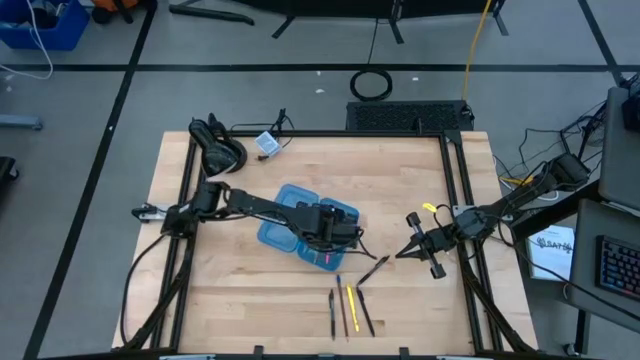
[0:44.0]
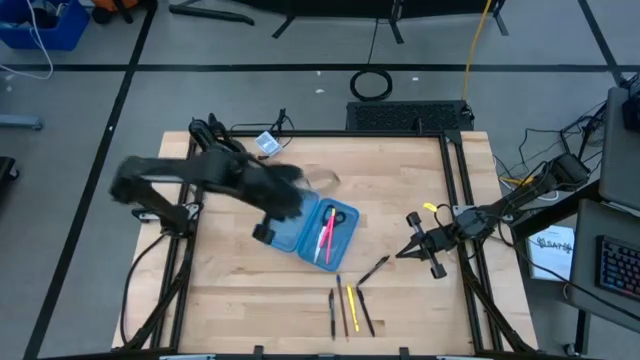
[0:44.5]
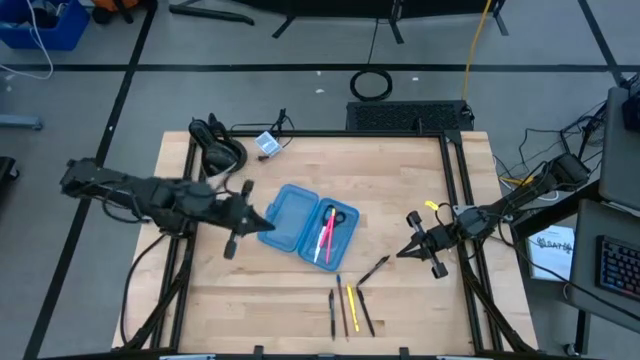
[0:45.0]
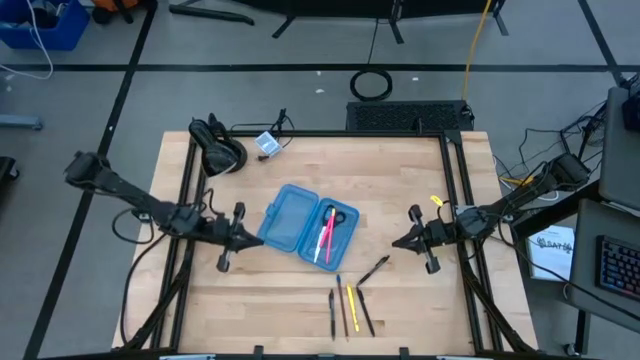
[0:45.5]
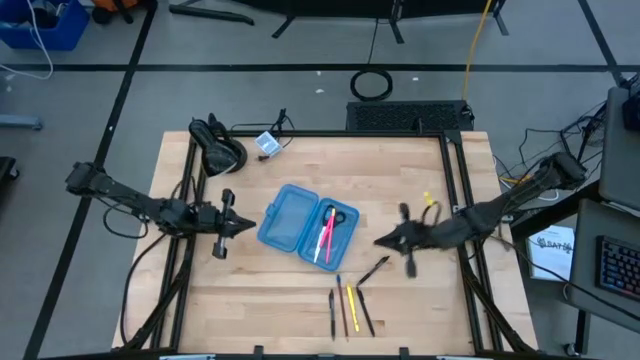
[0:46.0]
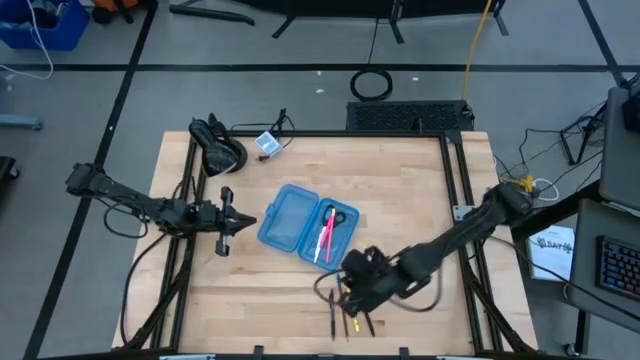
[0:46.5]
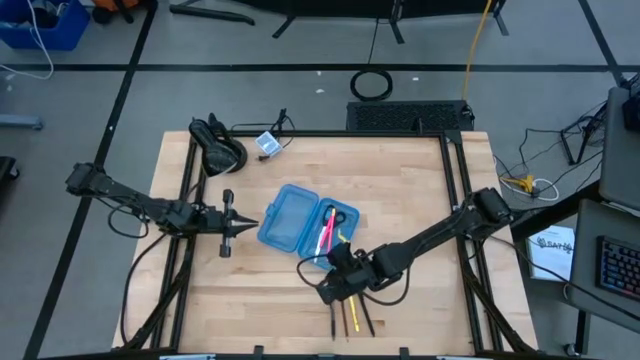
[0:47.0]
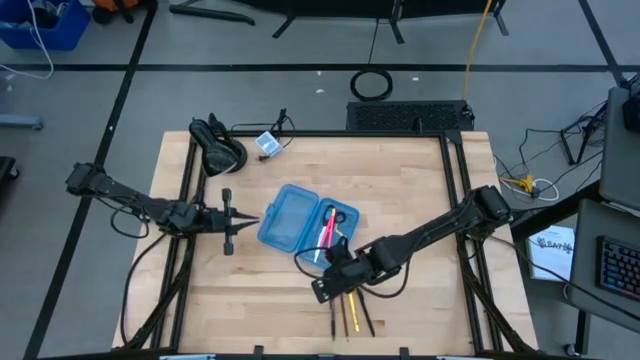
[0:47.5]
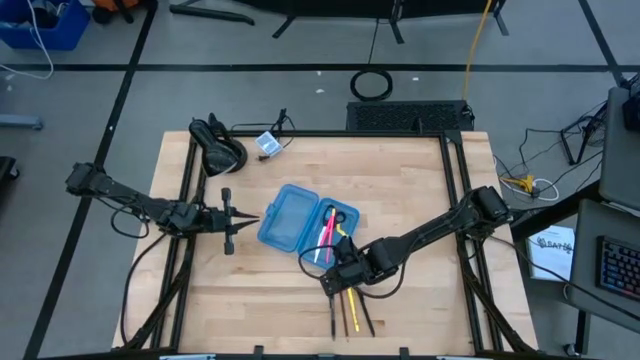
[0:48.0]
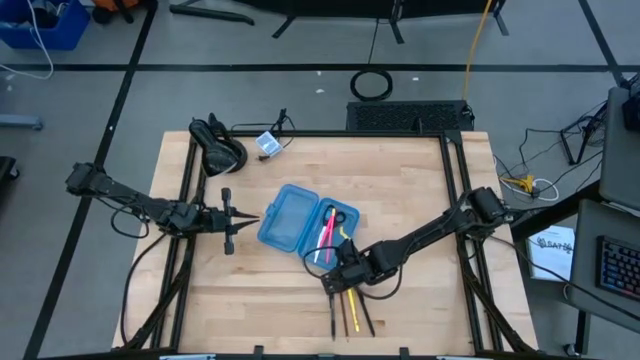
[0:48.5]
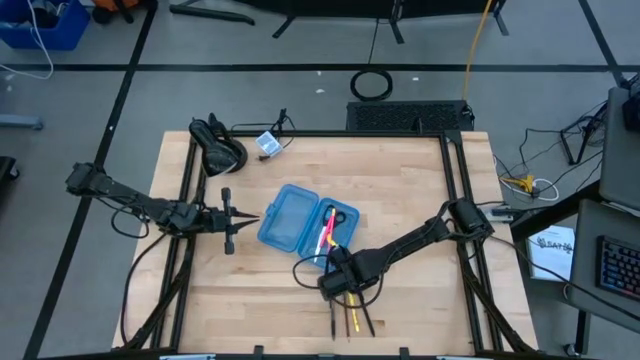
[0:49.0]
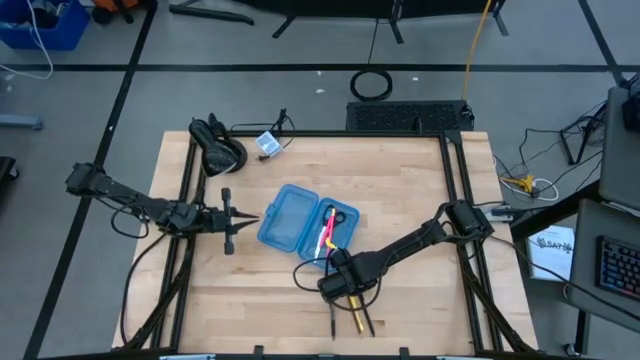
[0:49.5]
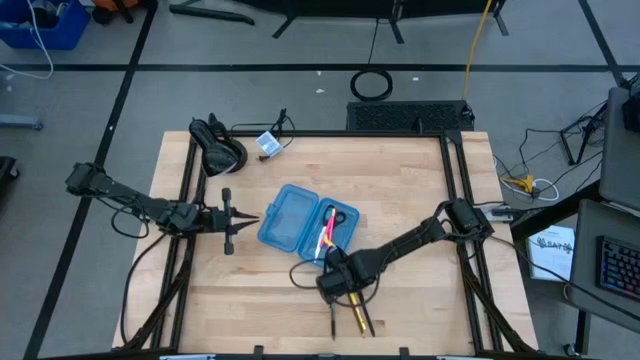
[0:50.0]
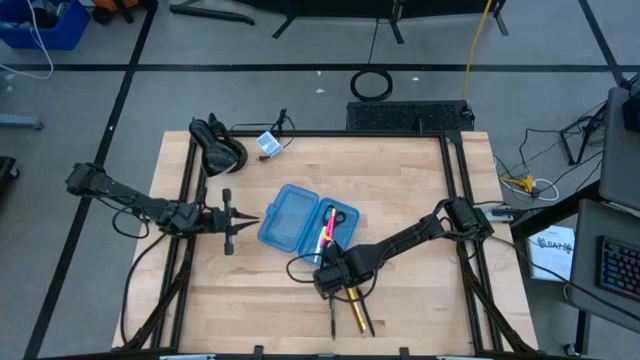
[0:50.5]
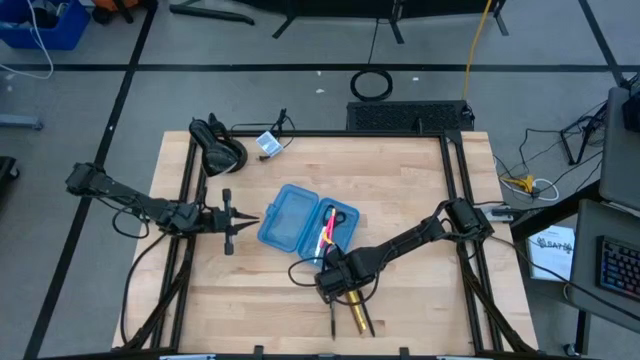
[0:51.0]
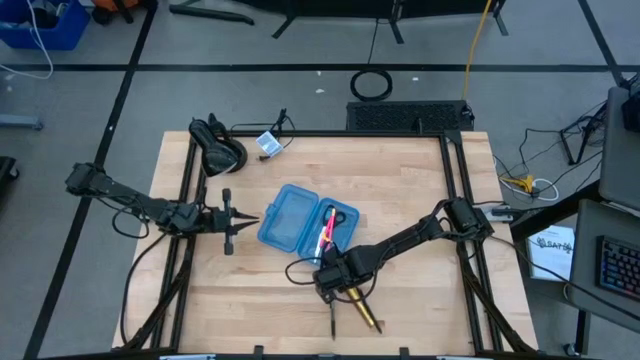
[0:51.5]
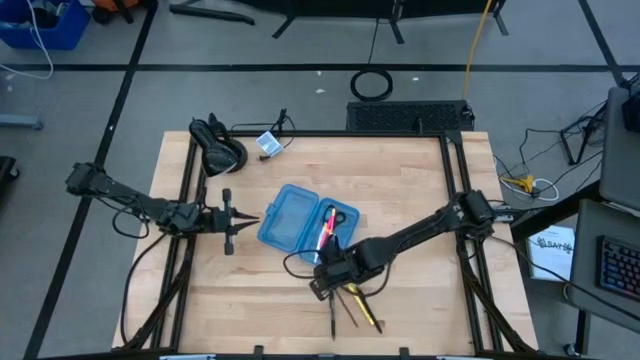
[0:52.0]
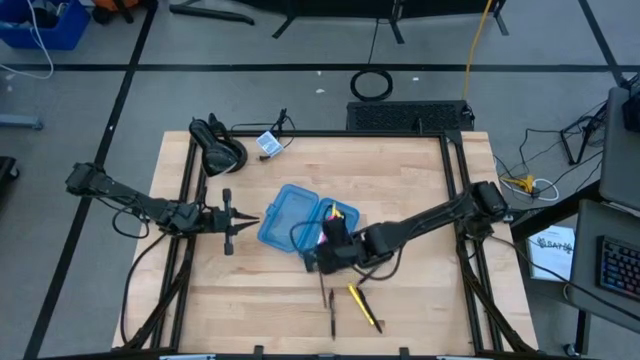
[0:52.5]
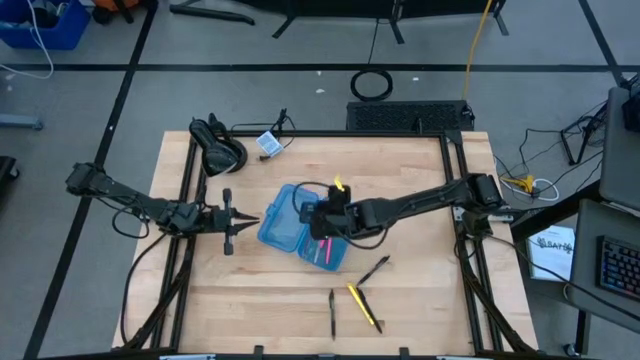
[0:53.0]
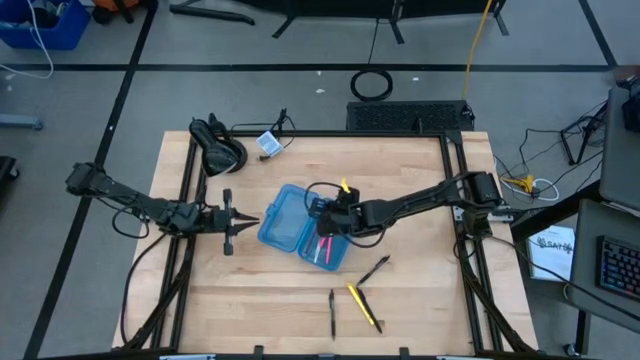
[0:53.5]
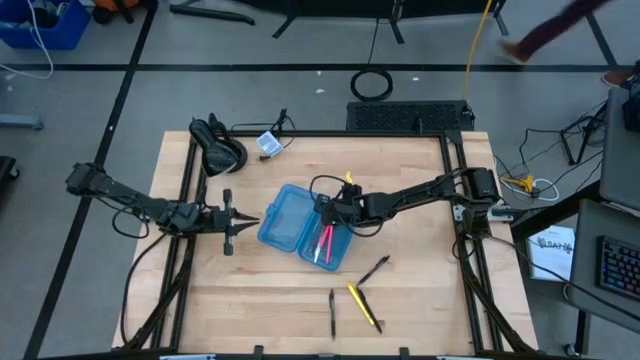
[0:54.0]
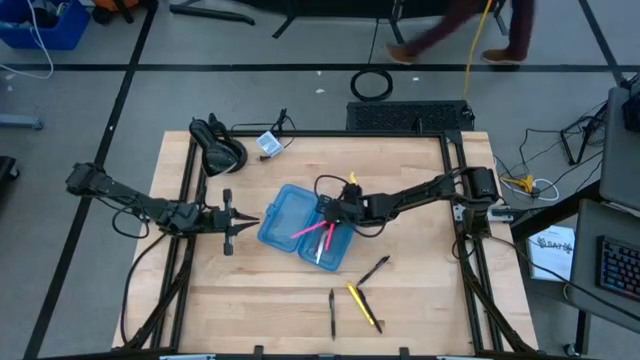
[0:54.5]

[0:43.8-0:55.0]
Task: Pick & place school supplies into a supply box
Put the brown pencil into the blue supply box

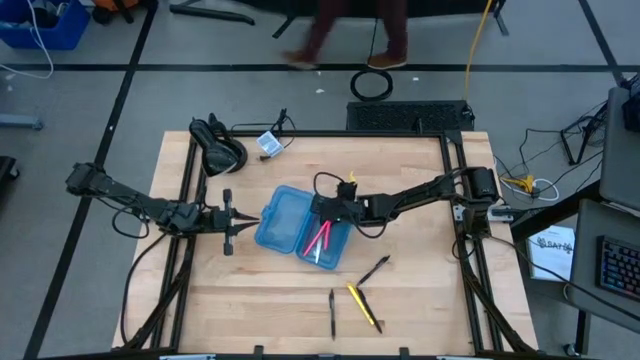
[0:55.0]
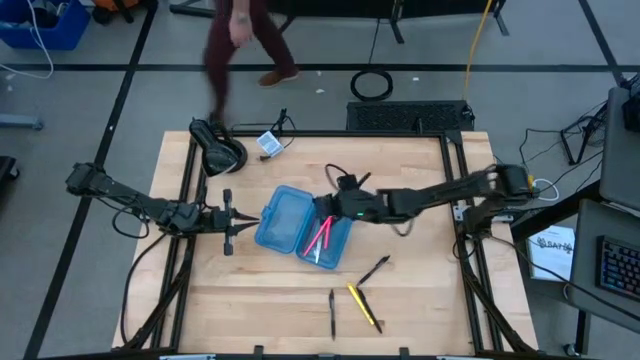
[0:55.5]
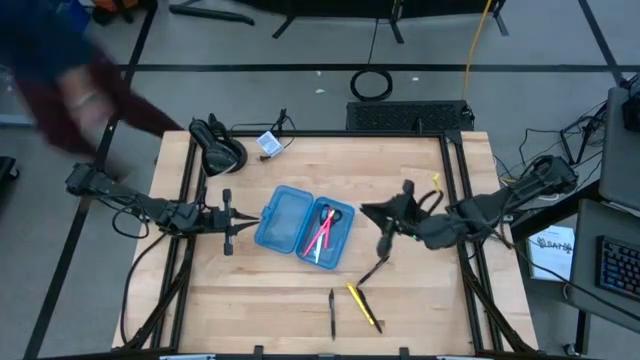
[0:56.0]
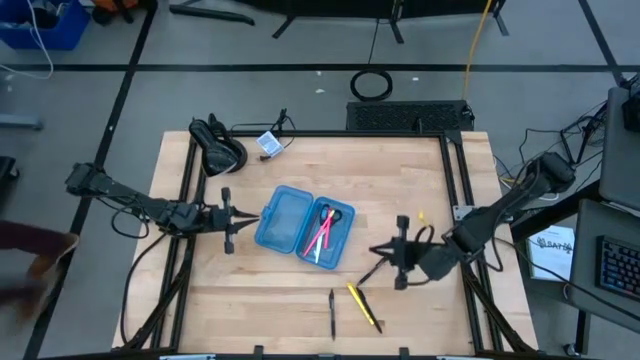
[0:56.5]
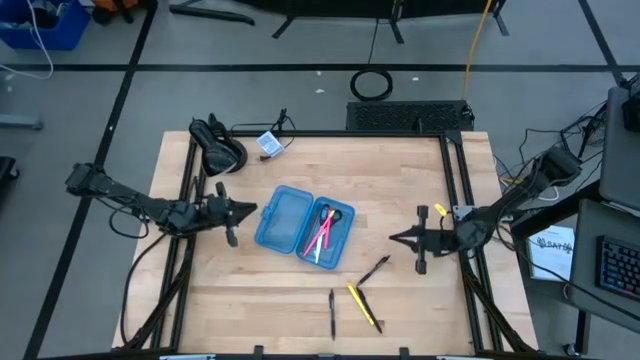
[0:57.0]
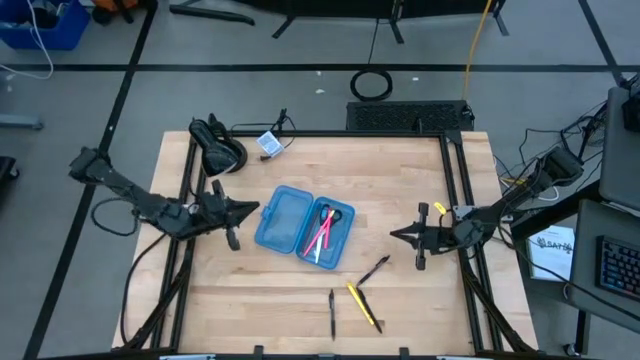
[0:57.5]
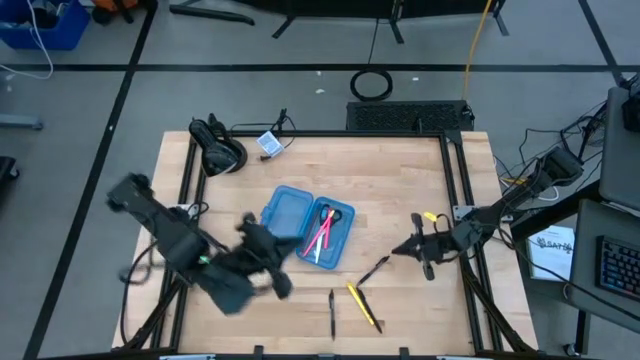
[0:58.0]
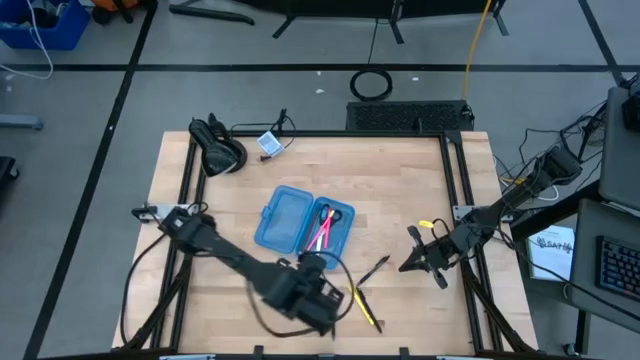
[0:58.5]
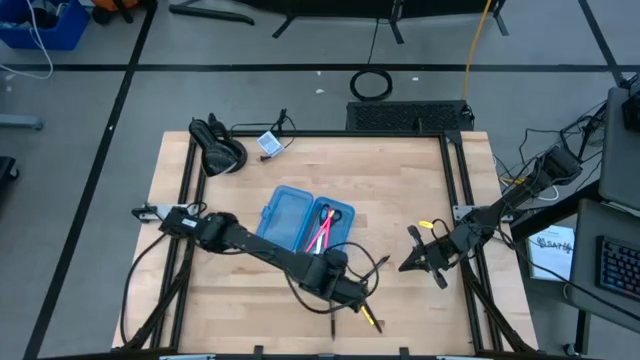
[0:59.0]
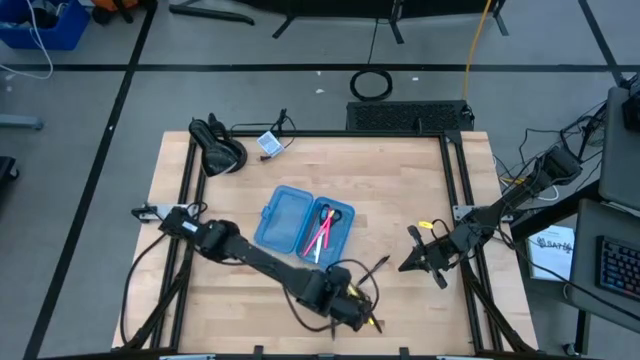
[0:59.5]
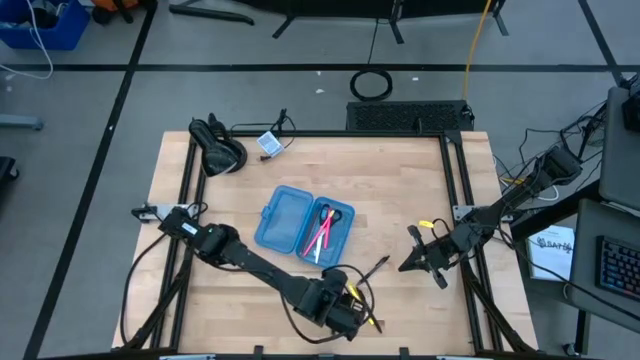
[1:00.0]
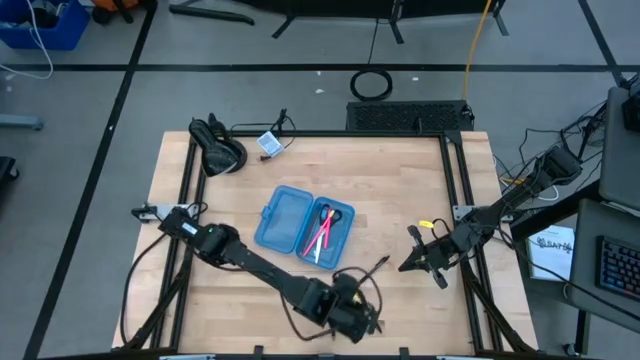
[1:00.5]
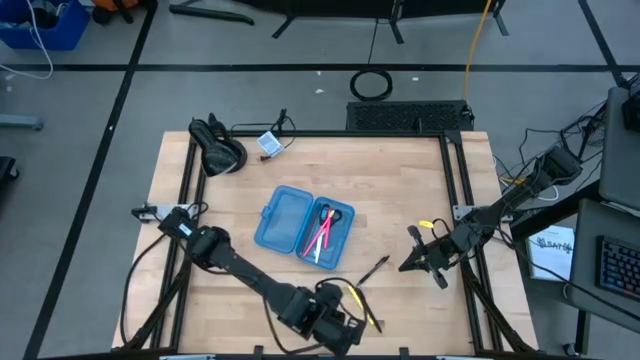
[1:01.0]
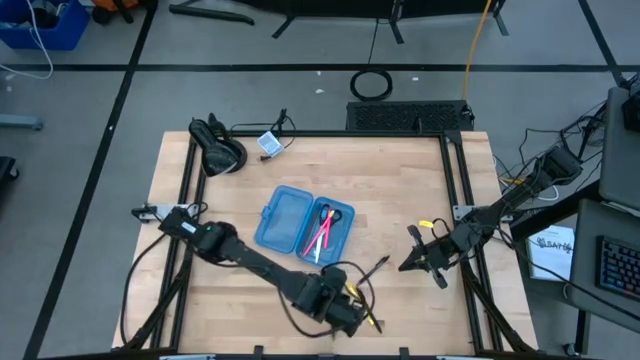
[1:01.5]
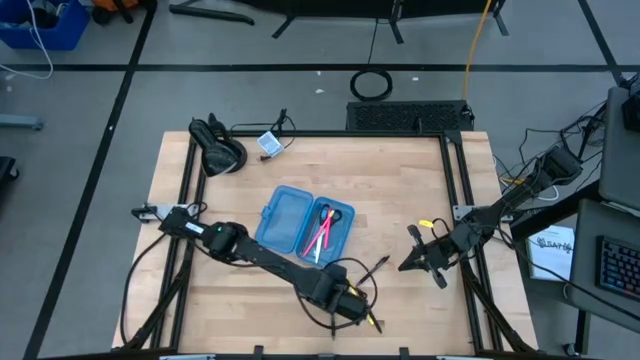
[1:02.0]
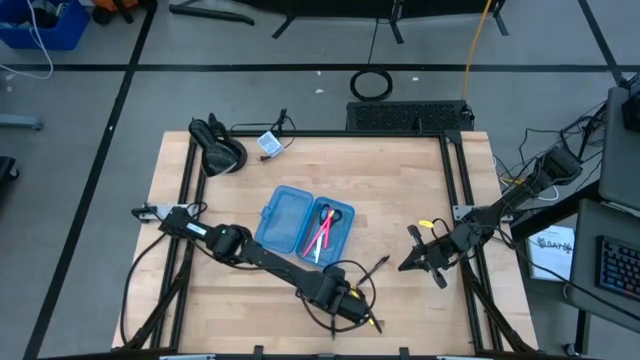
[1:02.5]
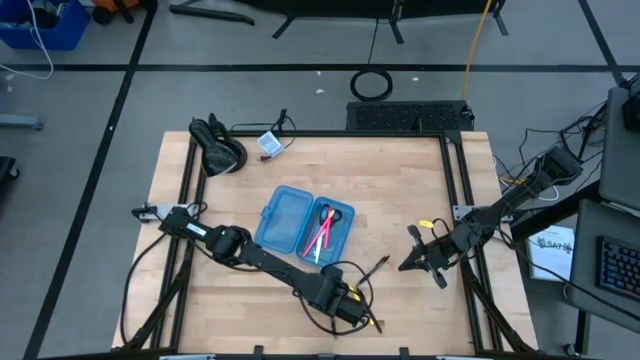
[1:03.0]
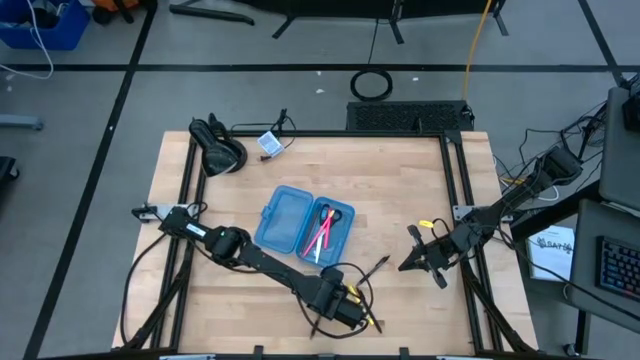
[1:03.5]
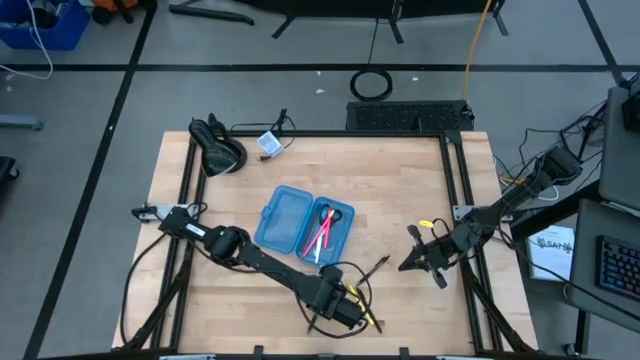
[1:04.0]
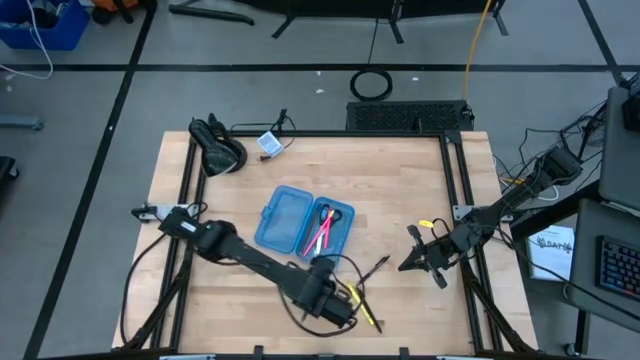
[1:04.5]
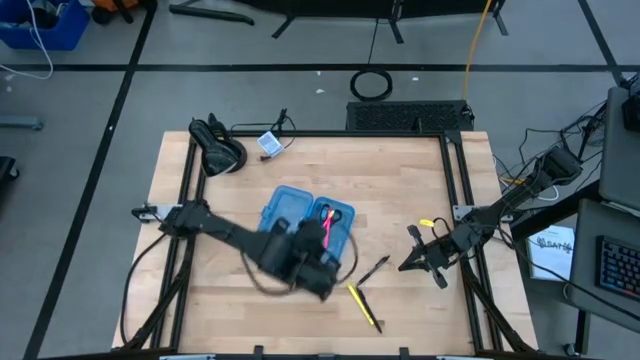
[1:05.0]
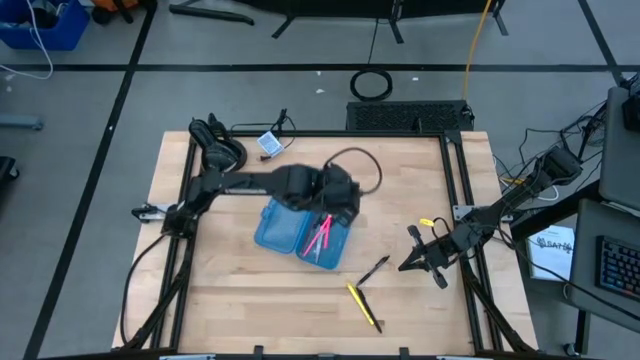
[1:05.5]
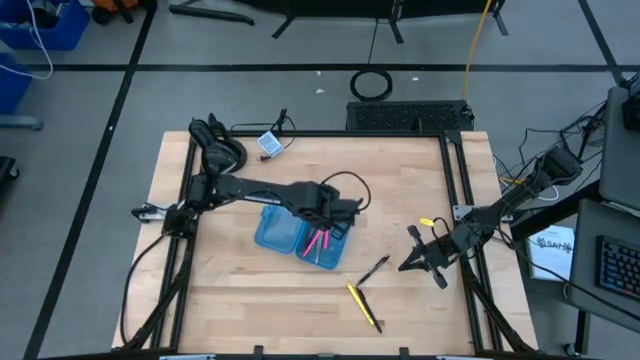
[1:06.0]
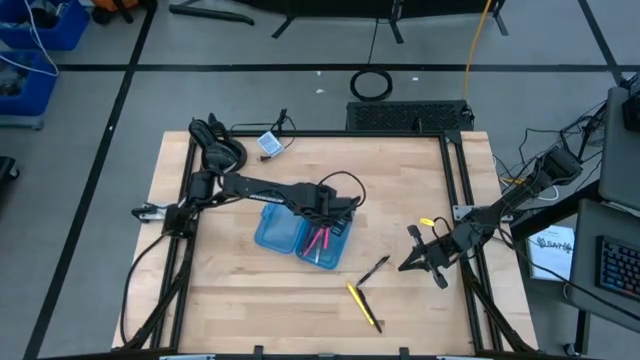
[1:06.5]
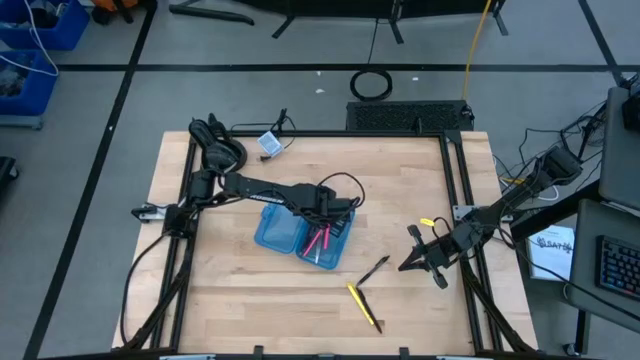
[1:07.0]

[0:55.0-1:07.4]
Put the bottom left black pen into the blue supply box
